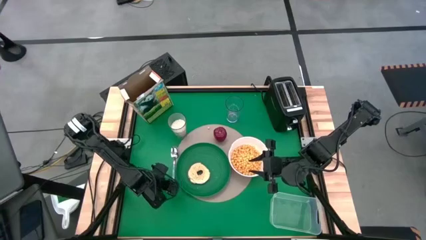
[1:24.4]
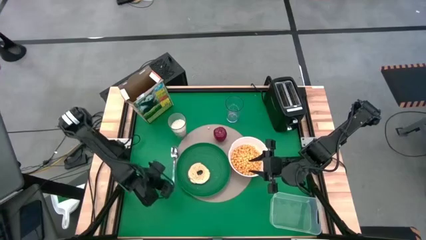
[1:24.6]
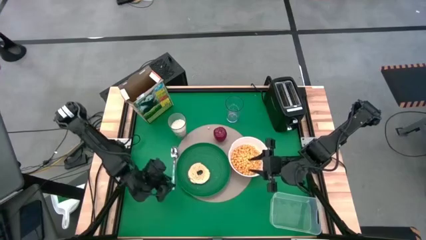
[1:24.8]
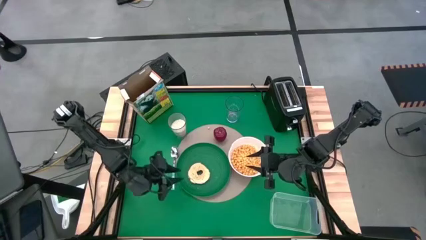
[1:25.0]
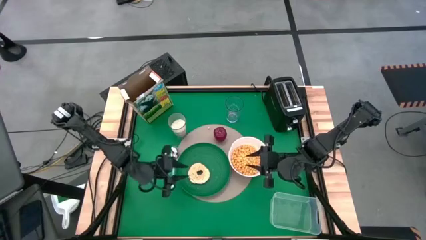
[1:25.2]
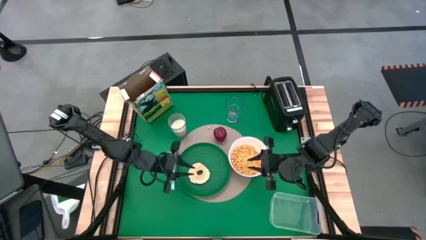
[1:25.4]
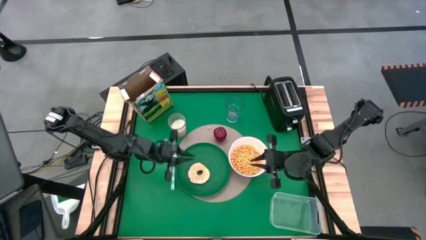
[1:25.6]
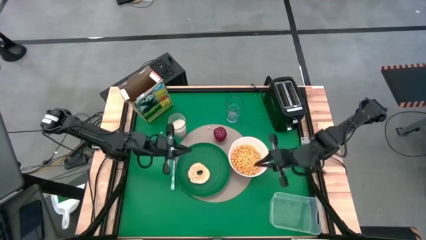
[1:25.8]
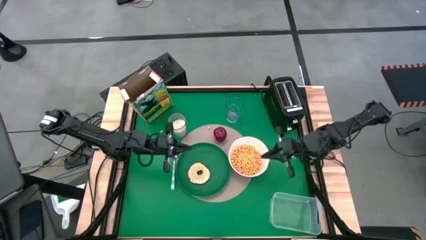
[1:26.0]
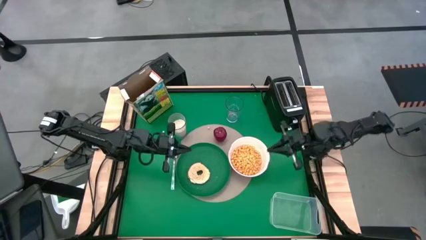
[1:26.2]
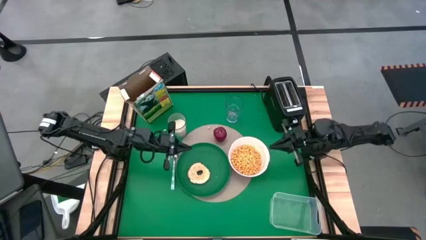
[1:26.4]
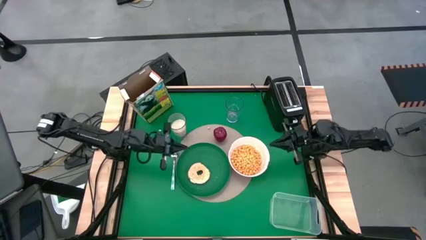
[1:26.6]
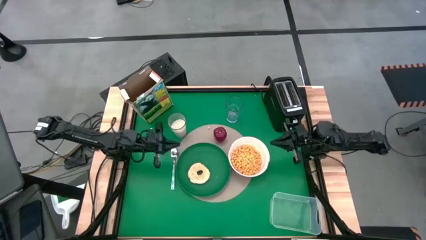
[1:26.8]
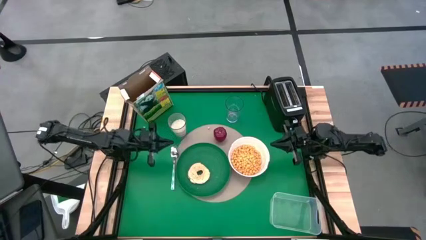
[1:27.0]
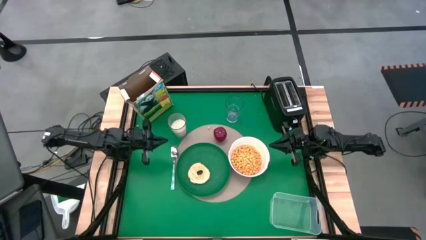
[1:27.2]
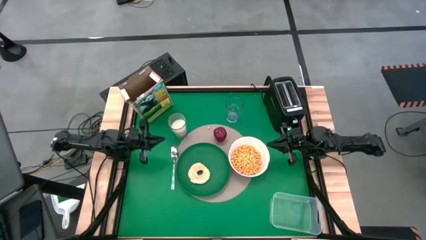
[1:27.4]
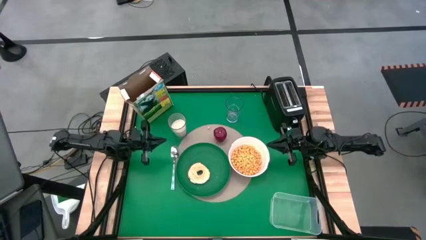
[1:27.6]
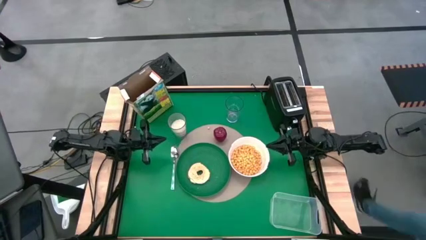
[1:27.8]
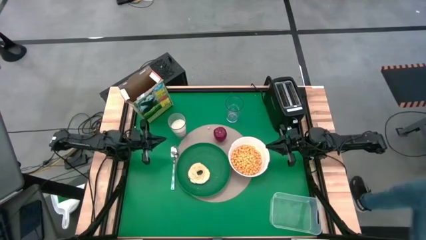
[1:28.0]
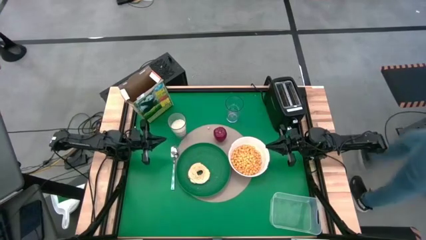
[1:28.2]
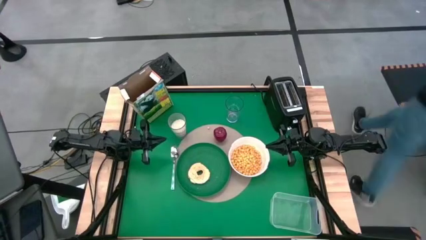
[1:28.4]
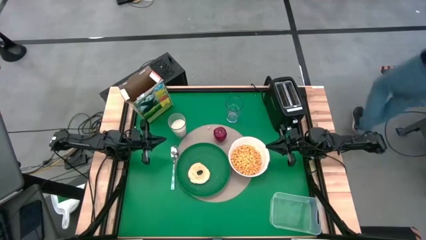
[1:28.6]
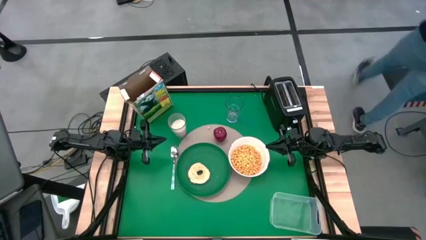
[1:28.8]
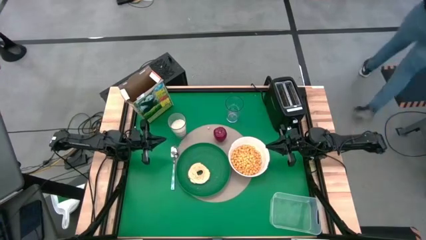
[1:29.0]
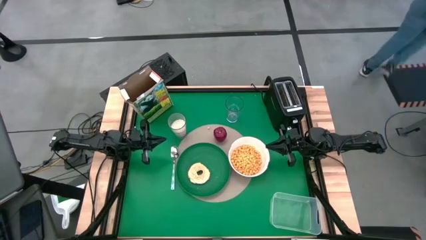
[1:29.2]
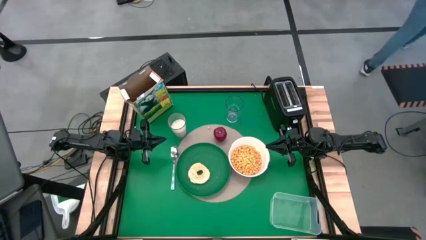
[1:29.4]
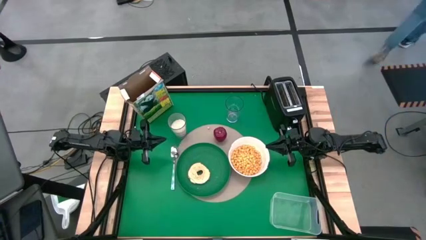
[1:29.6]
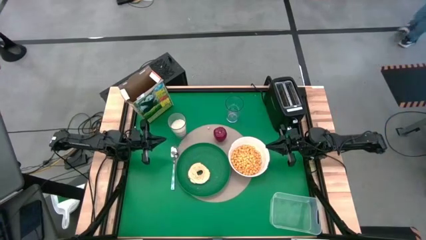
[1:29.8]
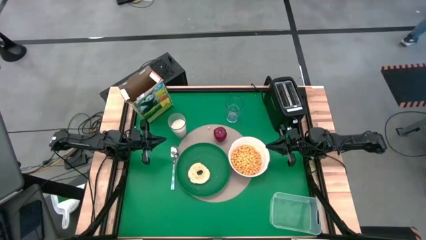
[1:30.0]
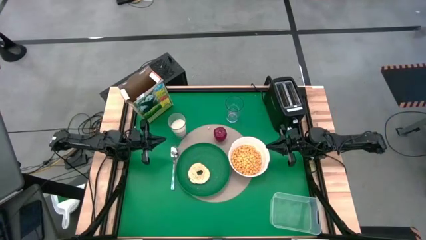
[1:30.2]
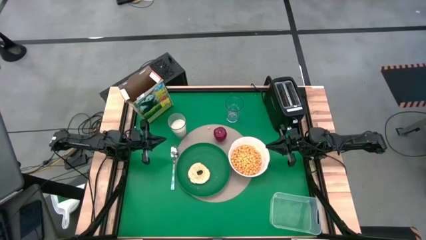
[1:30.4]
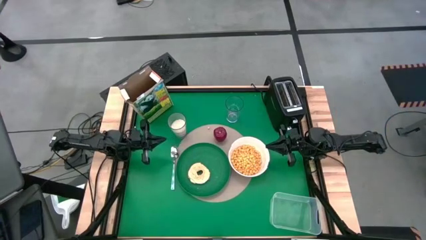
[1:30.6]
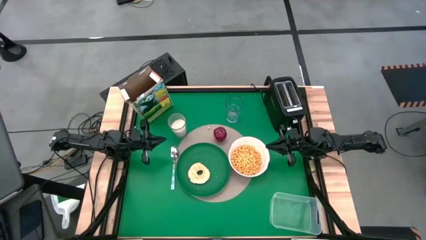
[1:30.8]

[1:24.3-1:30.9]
Task: Arrange a breakfast setting
Return to Home Position

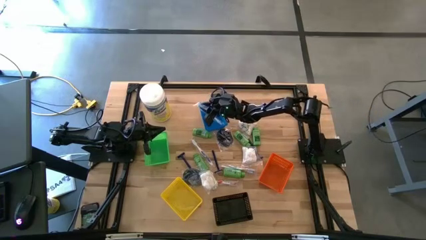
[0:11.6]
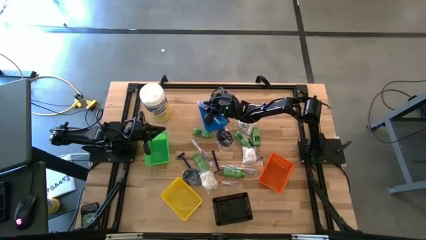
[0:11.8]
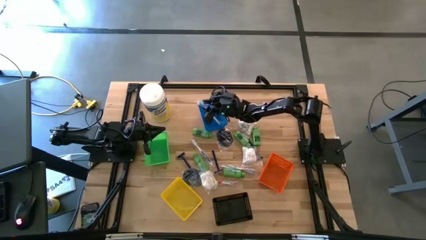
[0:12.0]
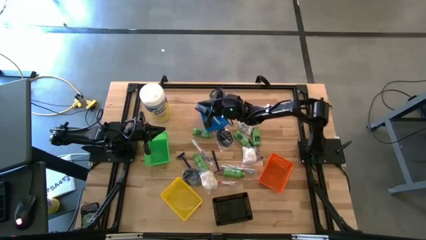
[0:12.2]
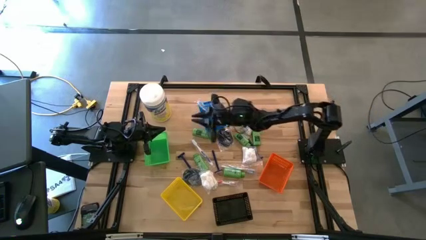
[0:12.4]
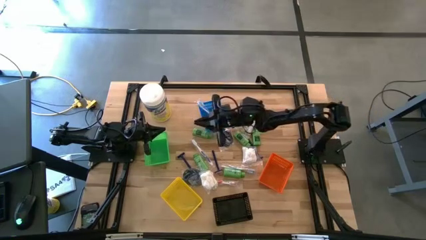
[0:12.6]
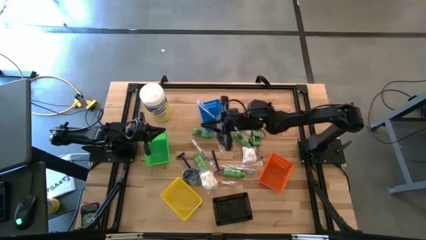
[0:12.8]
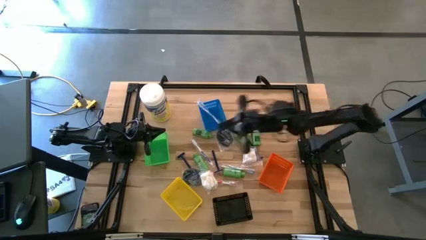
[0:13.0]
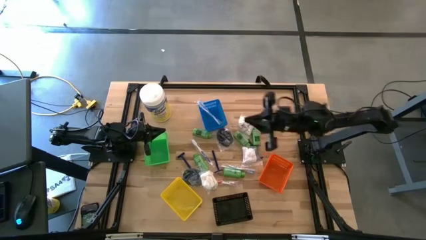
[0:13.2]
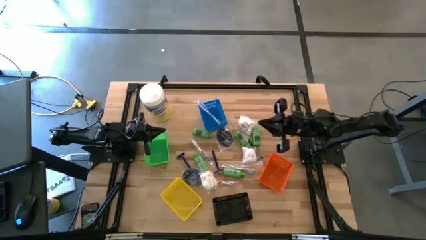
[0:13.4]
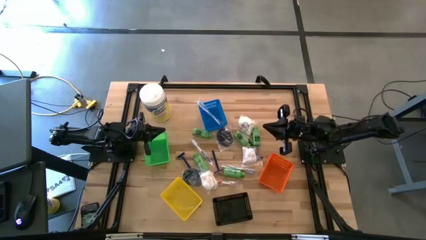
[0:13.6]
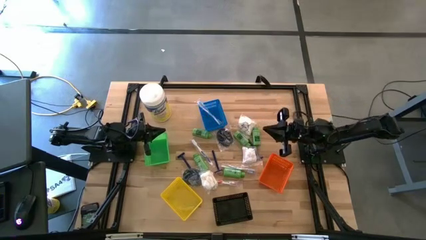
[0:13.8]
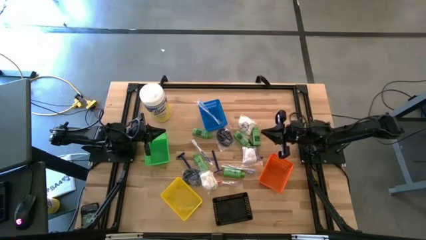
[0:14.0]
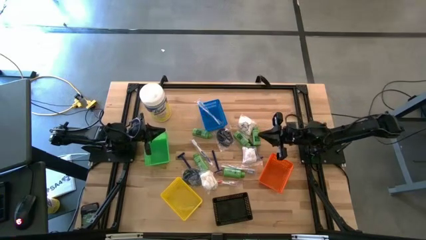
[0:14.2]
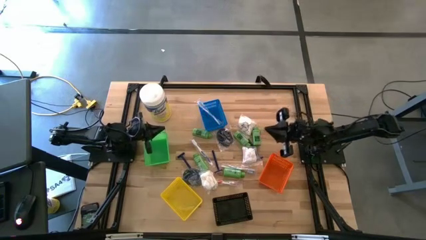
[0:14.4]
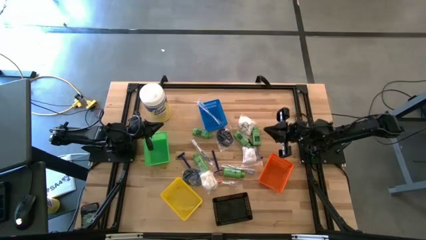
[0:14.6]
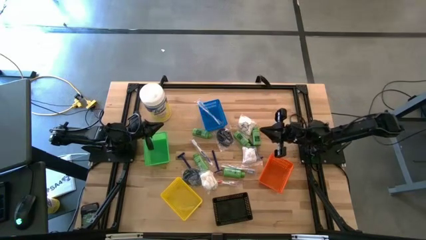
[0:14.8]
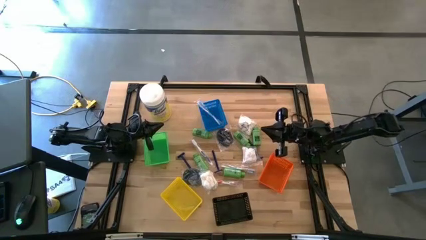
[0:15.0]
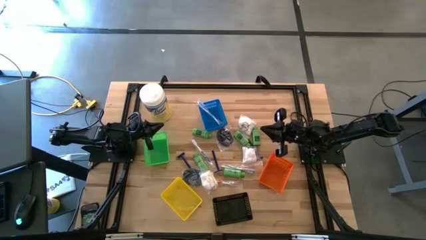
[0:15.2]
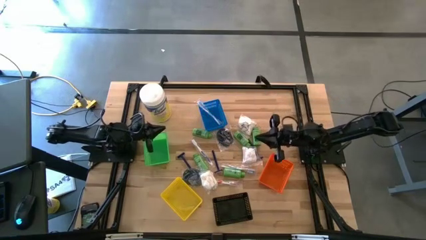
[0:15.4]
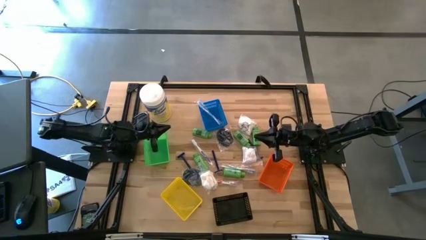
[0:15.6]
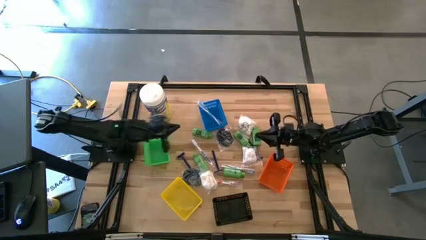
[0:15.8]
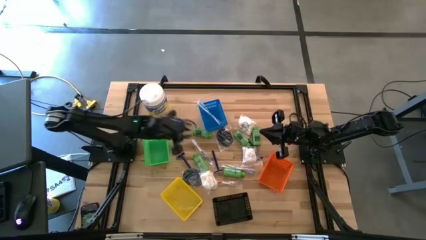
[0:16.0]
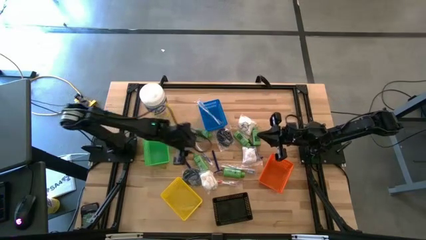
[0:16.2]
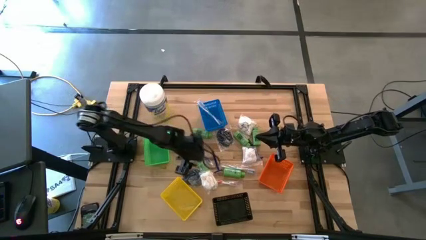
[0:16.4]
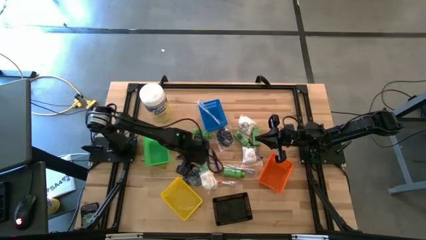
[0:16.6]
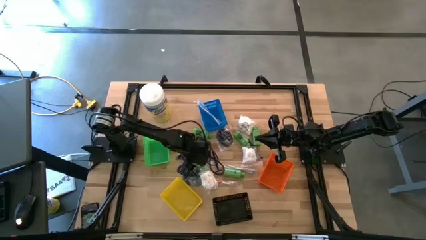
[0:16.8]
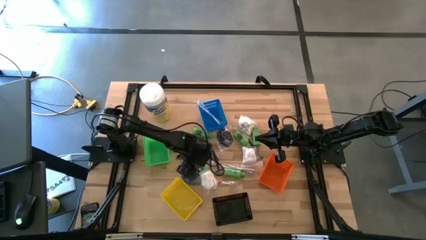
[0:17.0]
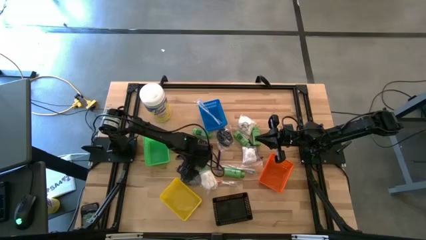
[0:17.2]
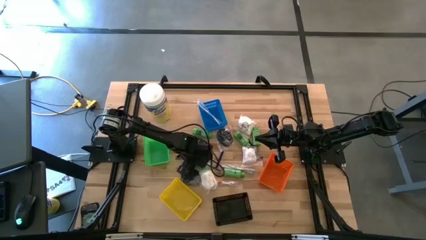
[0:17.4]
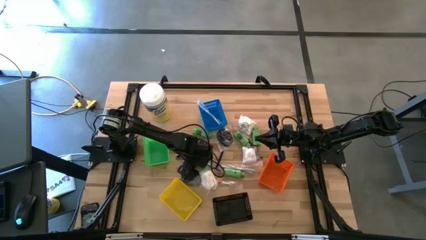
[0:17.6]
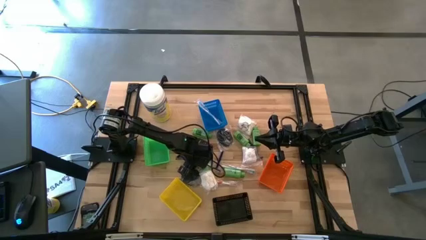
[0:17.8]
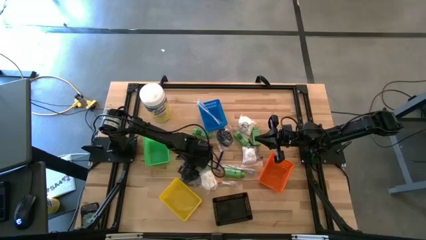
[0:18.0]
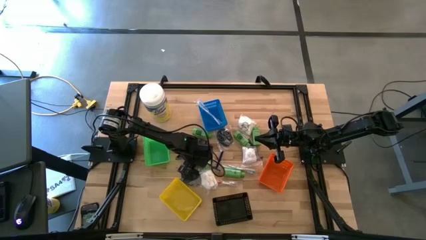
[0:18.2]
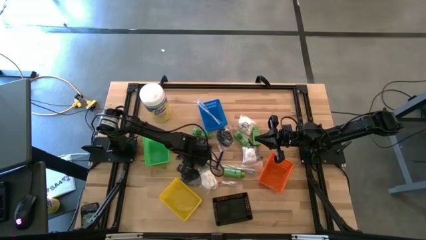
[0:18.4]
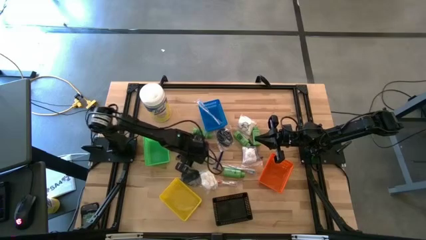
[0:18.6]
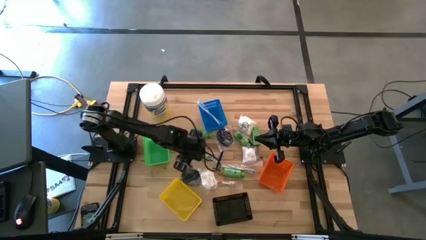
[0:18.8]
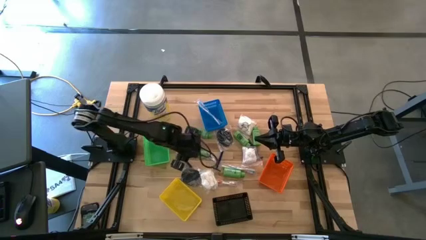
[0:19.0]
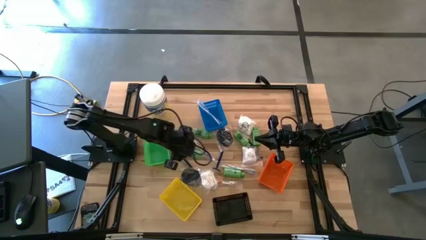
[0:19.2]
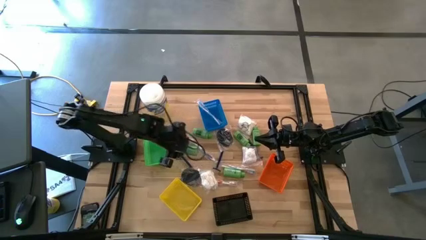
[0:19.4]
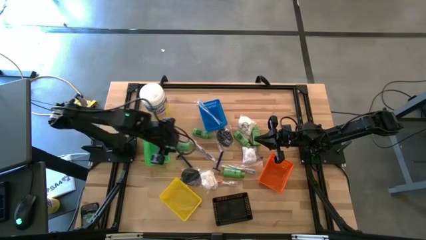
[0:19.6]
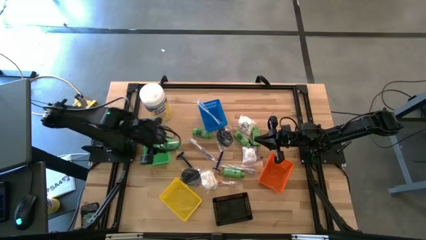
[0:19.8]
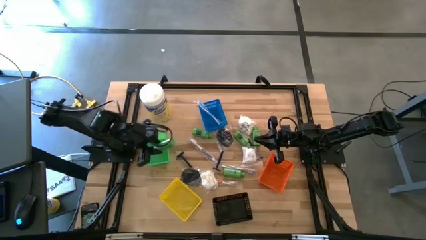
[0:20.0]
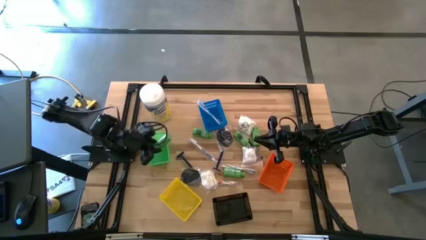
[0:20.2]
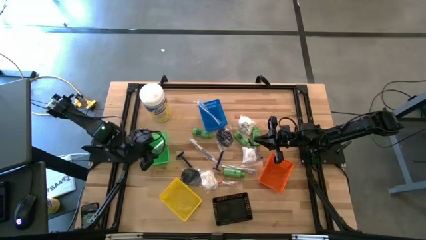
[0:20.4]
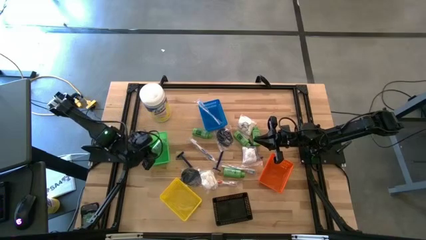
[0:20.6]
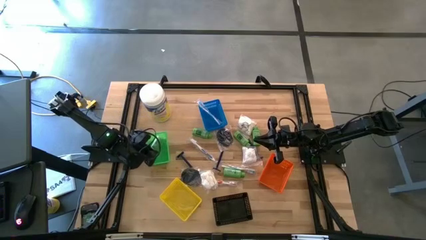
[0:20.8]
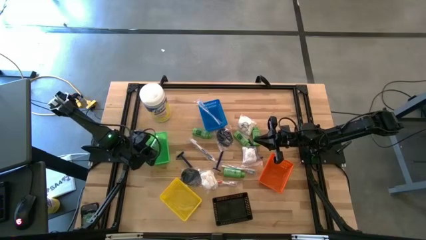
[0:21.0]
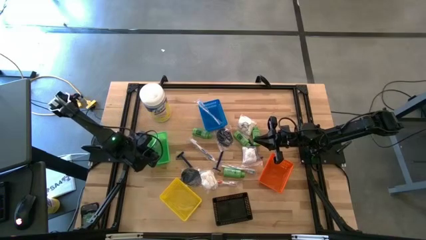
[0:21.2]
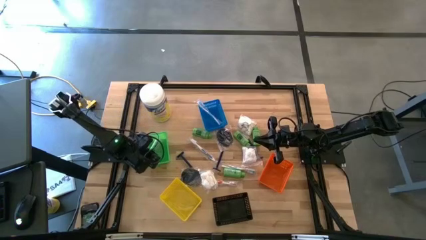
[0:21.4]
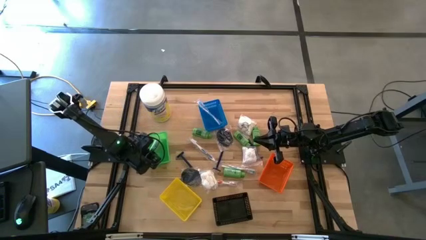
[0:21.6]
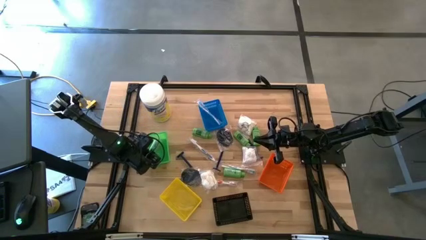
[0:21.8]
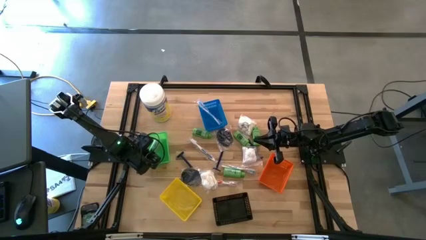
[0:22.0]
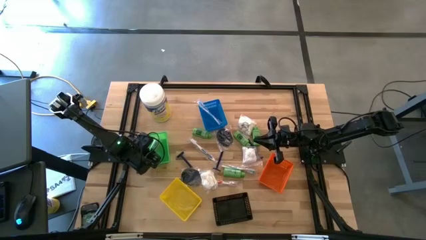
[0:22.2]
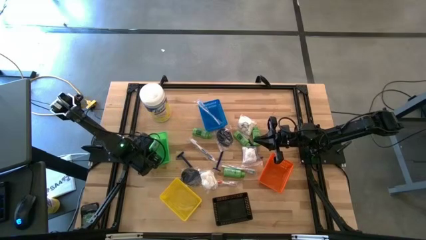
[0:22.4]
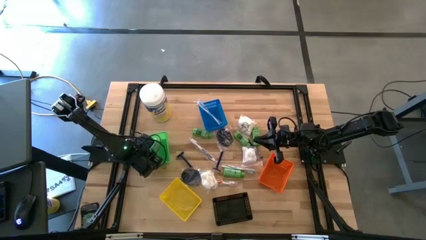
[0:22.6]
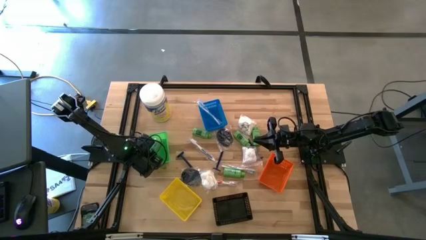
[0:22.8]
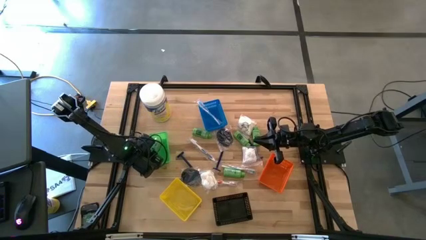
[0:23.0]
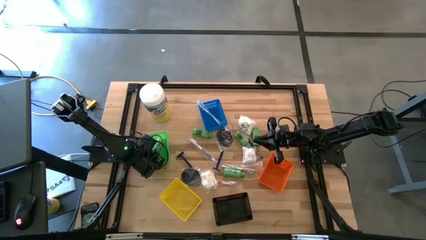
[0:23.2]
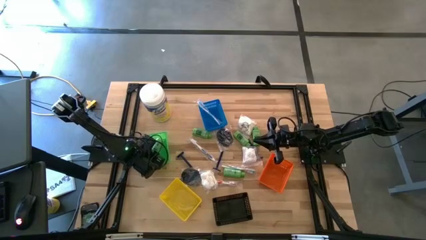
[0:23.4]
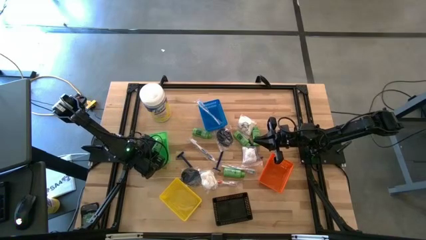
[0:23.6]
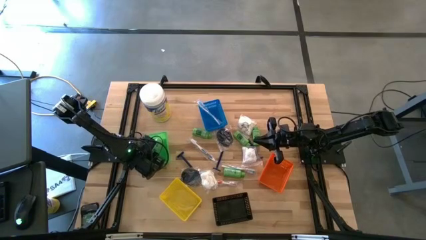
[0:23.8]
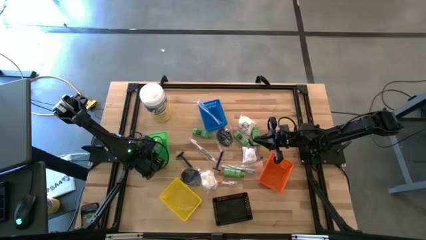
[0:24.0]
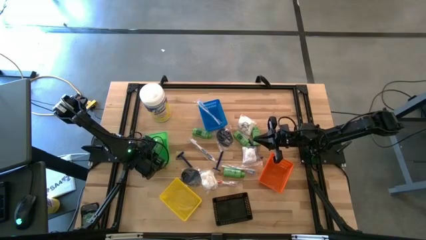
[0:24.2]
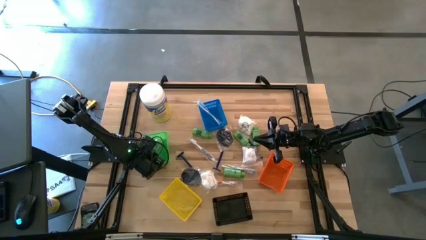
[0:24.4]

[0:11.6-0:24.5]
Task: Pick & Place Travel size toiletries
Put the green shampoo into the green bin
